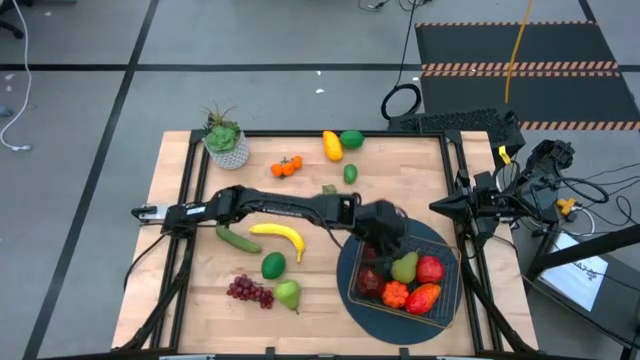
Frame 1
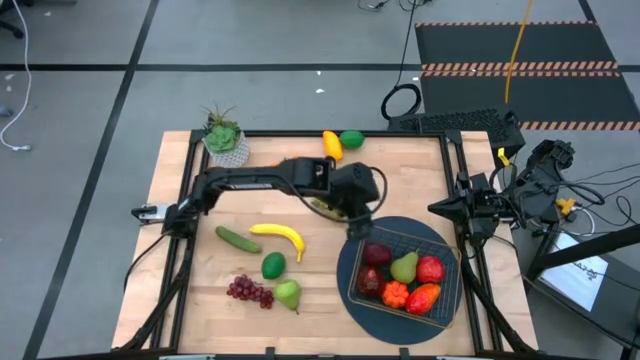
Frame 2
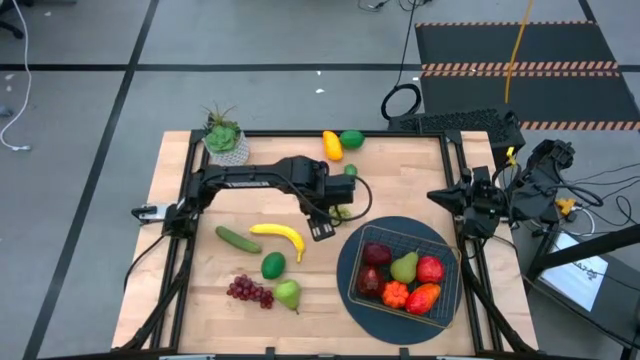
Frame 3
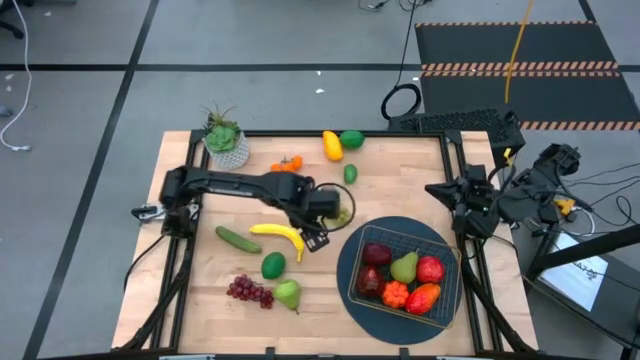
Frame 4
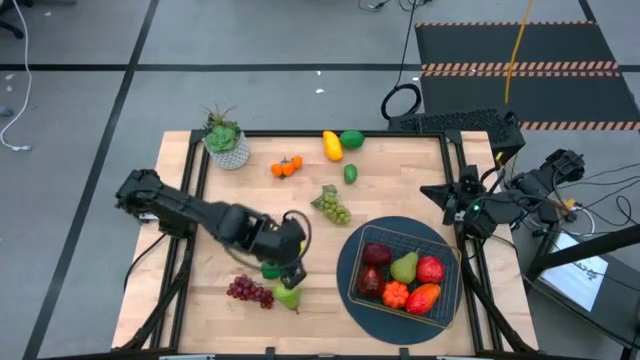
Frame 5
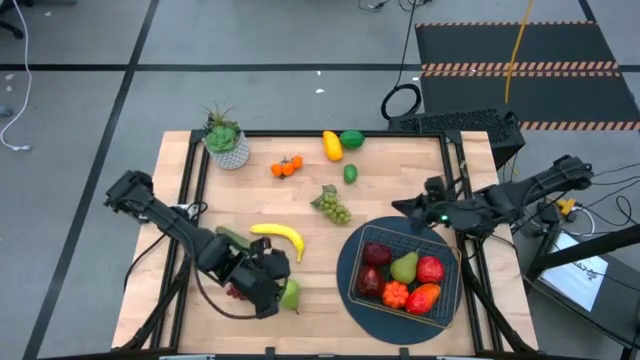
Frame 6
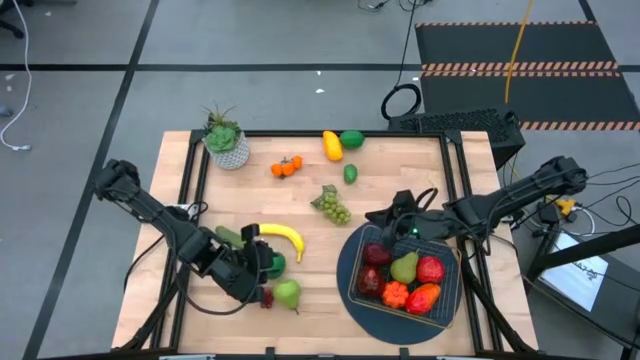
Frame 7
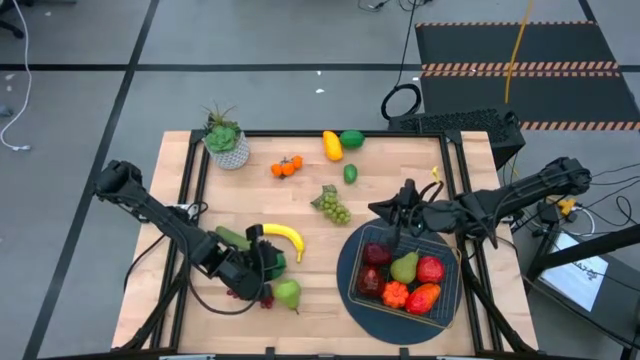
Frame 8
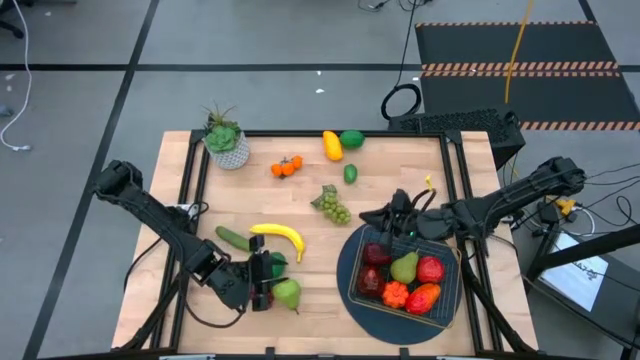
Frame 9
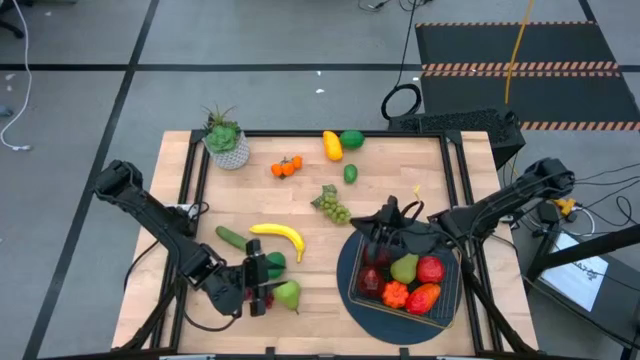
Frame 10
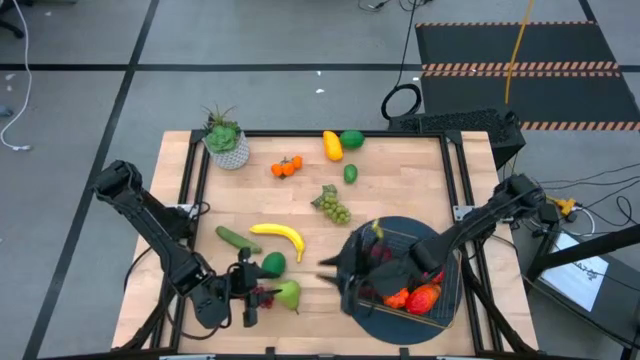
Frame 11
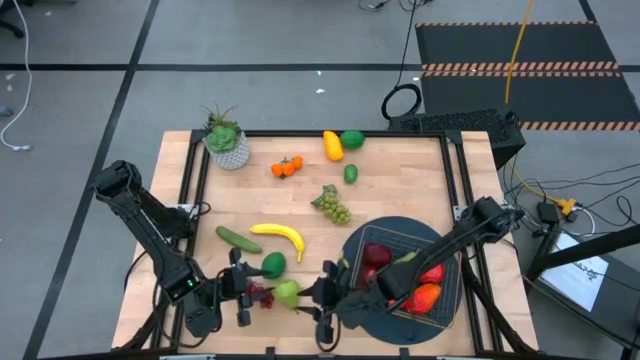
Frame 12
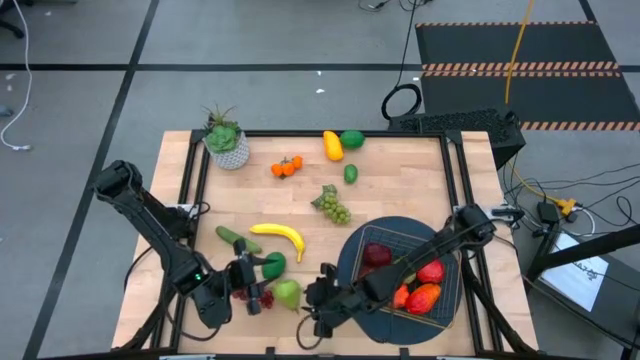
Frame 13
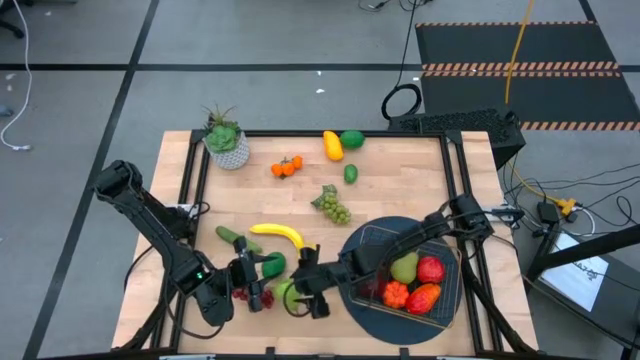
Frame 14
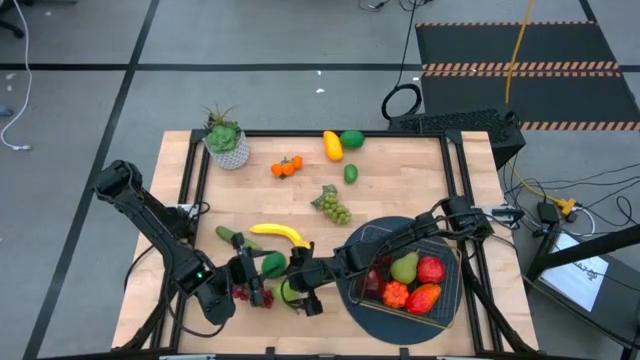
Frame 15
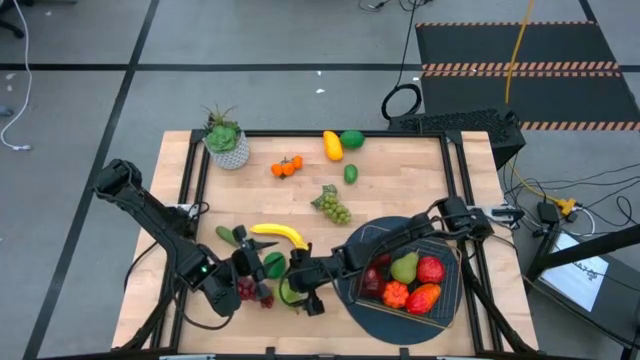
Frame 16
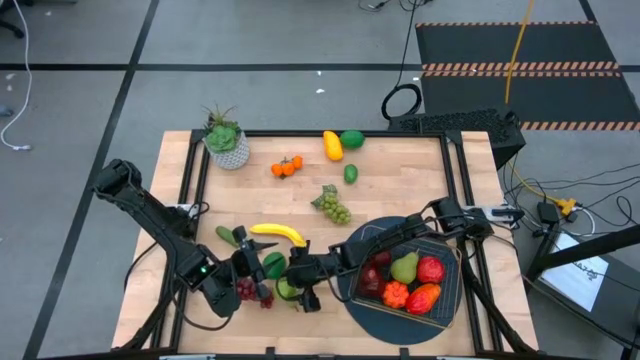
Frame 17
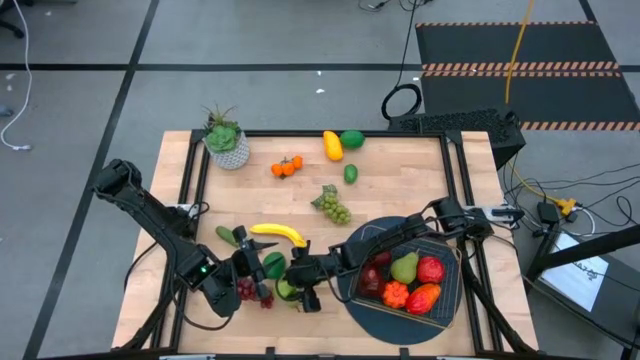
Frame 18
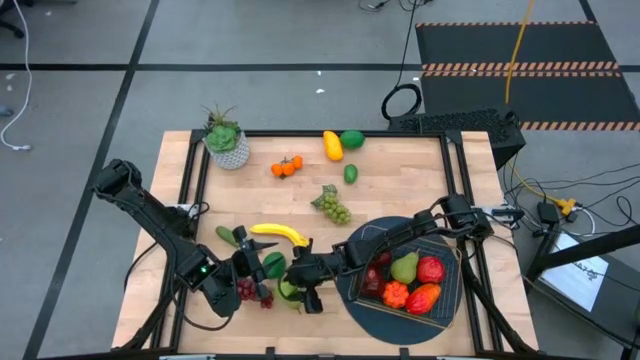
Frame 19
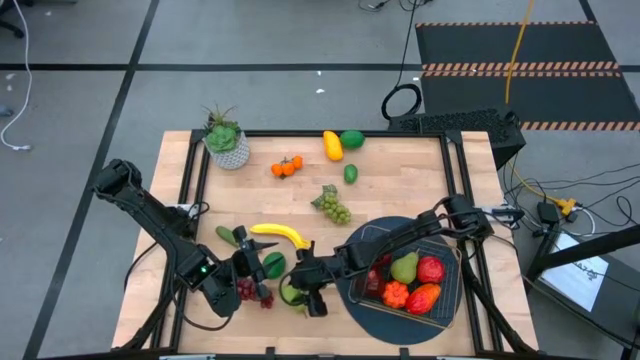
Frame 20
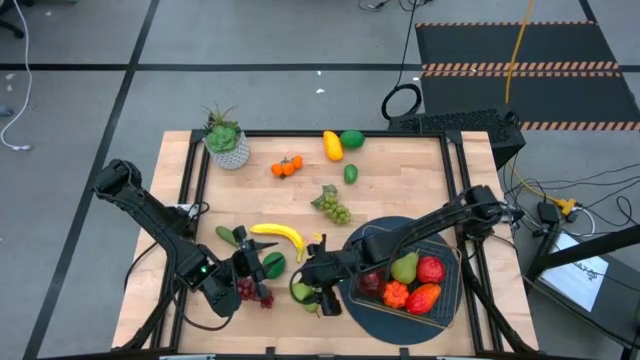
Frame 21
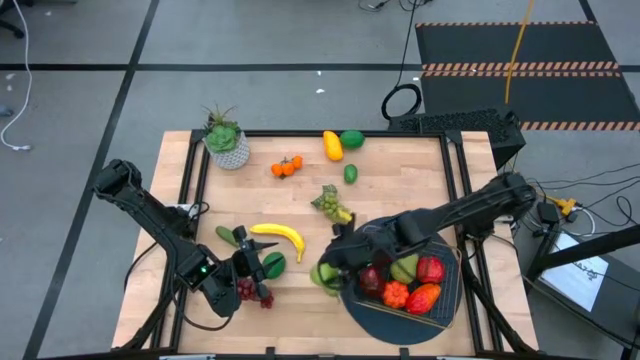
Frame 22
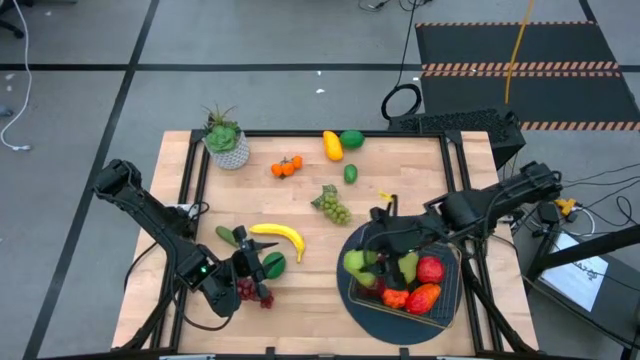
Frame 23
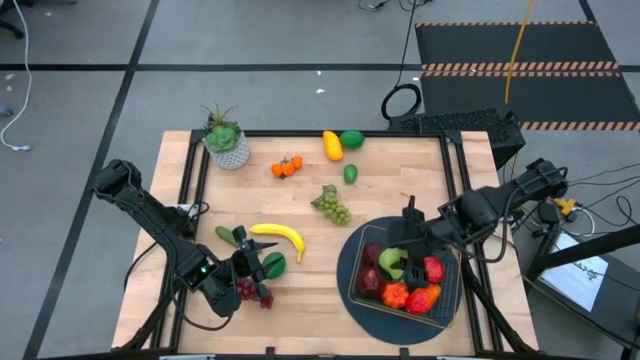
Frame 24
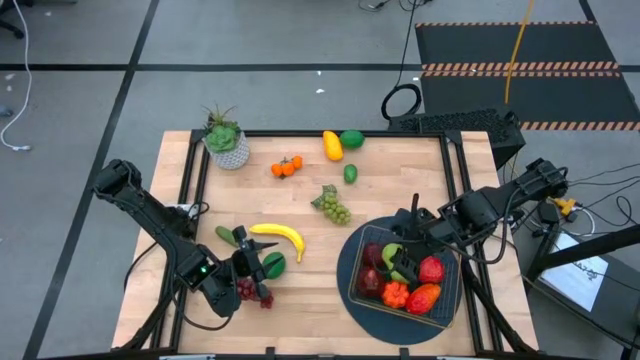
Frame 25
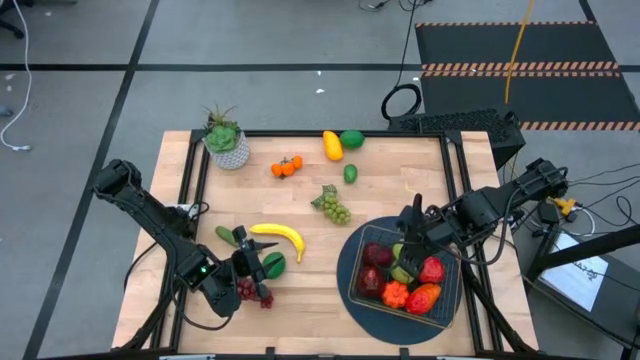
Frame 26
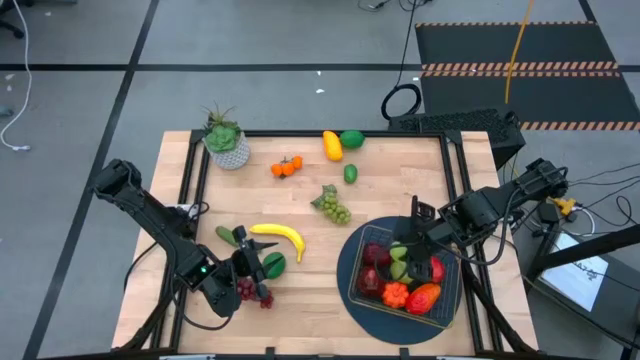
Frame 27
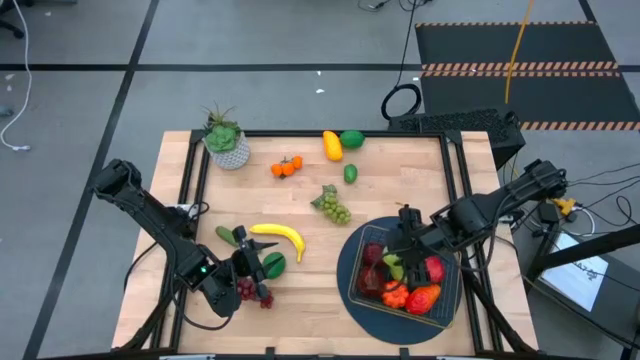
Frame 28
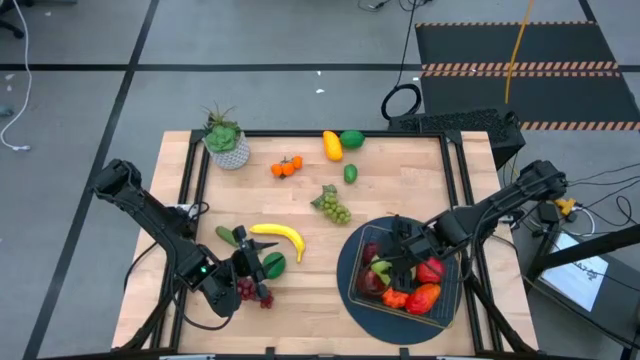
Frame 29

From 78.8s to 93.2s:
Task: Build produce basket
Put the pear into the gold wire basket

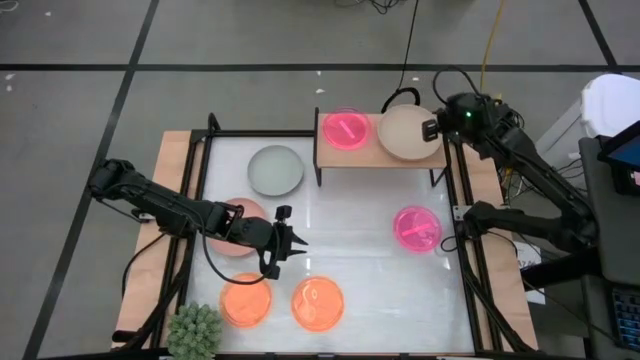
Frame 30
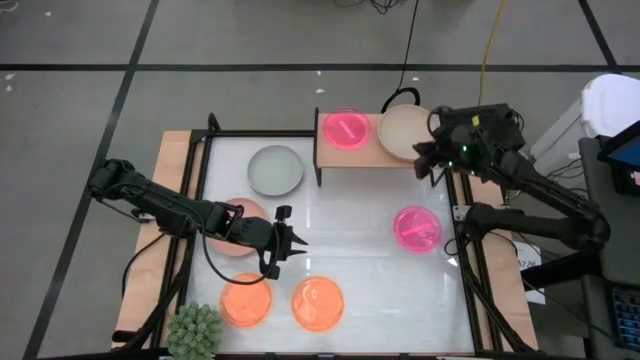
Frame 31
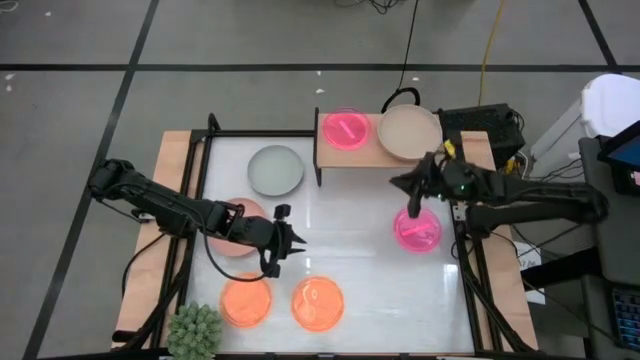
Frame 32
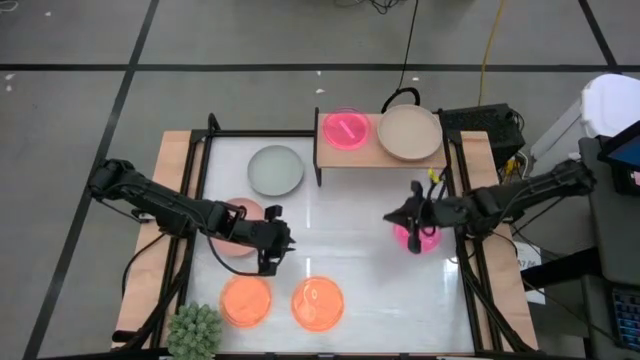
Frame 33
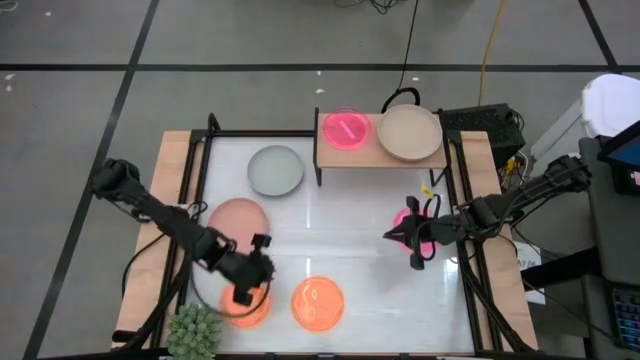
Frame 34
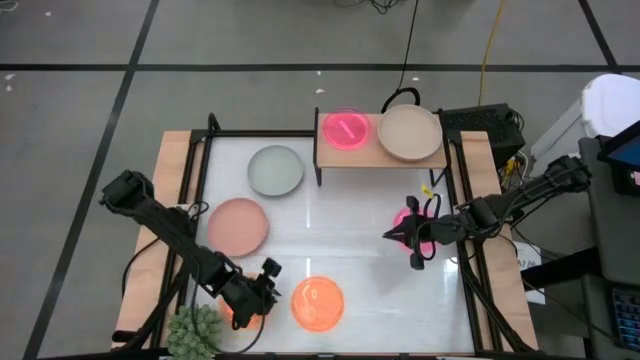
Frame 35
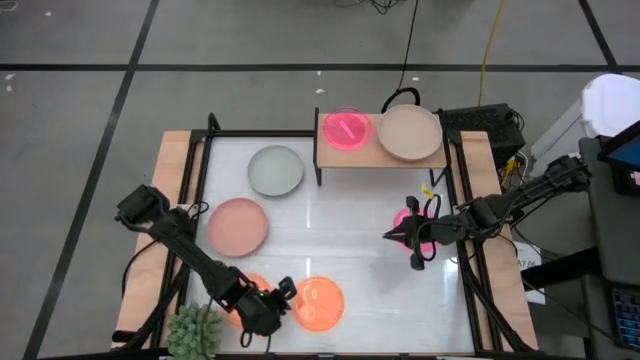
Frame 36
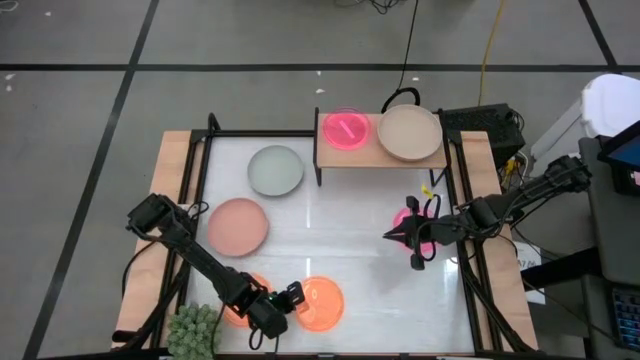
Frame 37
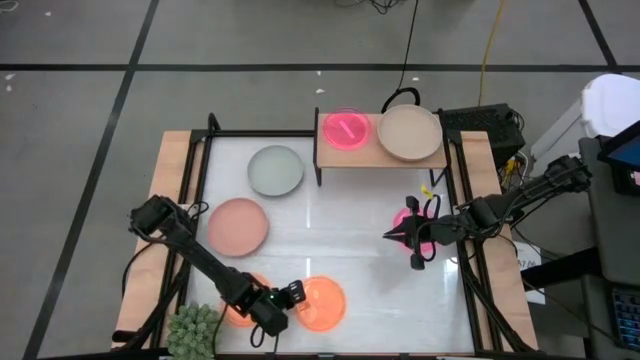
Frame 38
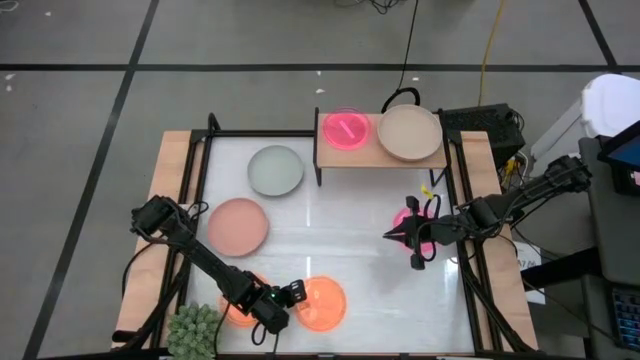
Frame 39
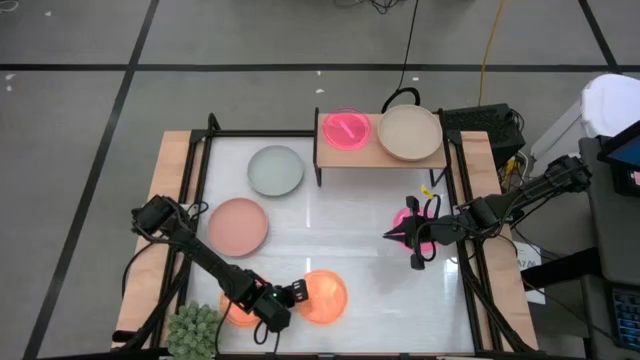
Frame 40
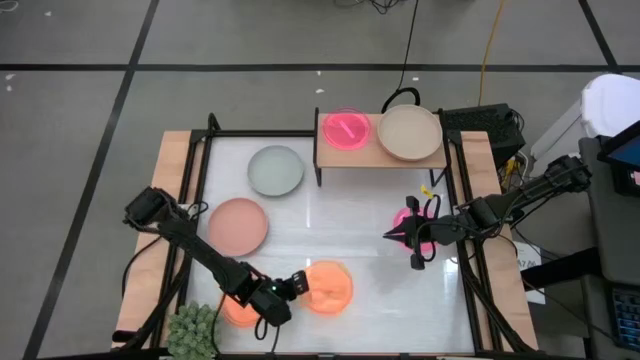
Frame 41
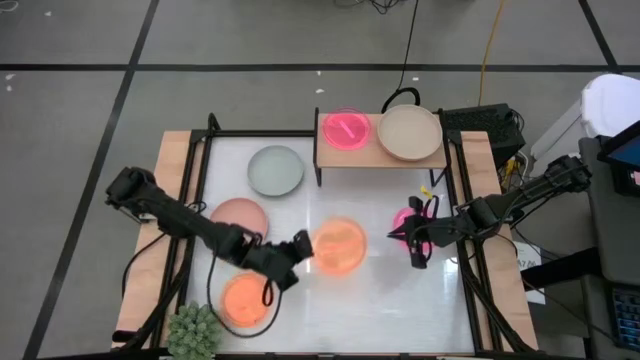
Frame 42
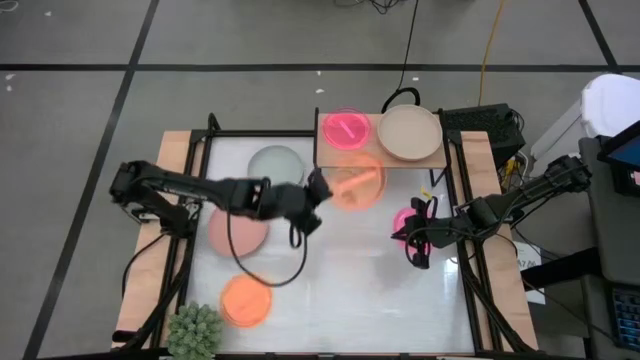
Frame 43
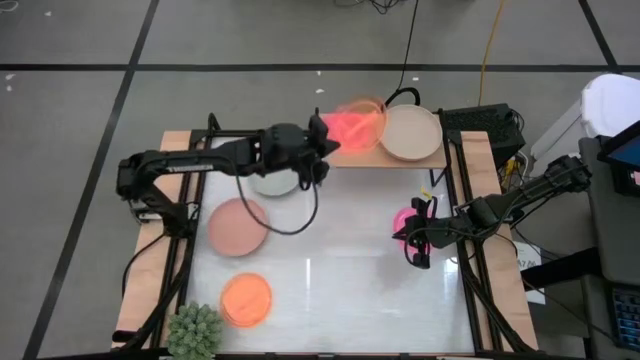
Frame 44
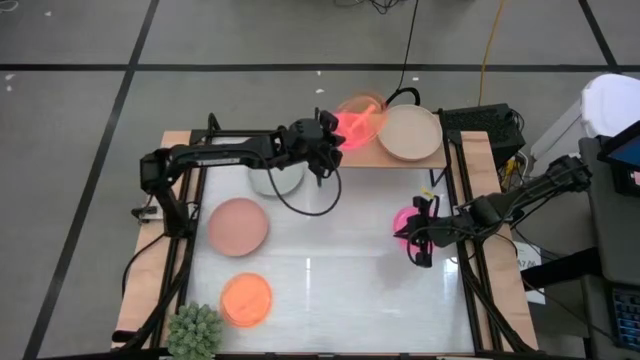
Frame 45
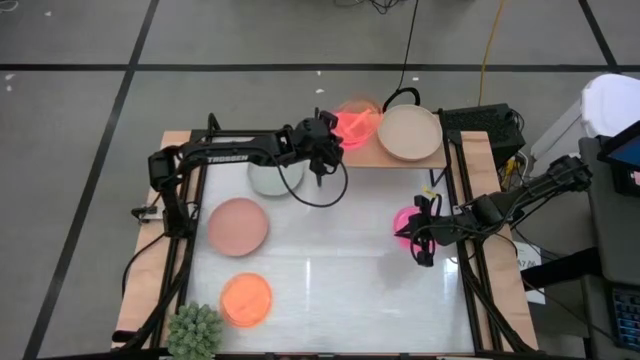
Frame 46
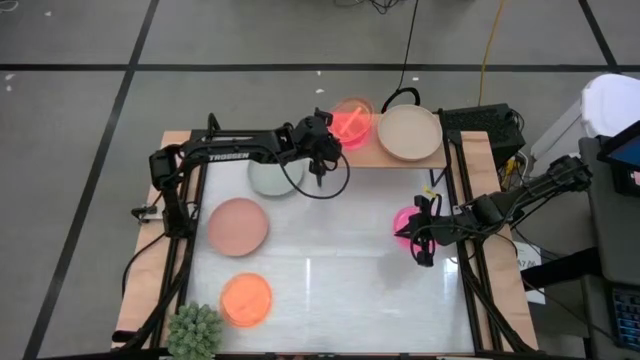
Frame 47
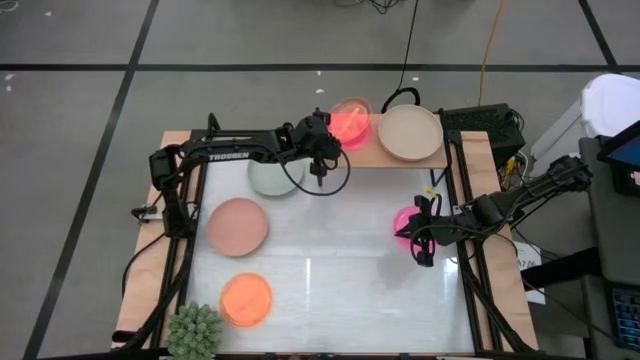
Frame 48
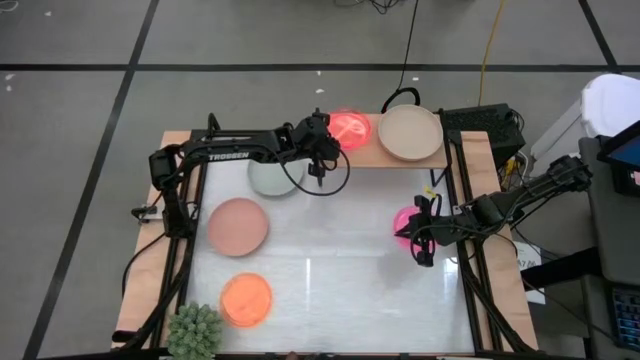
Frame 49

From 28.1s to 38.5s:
Task: Place and stack plates onto a shelf
Stack the right orange plate on top of the light pink plate on the shelf
